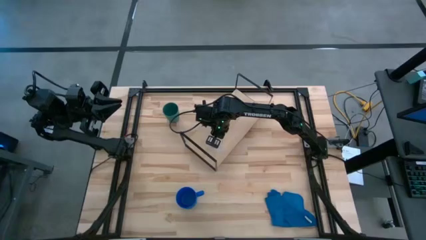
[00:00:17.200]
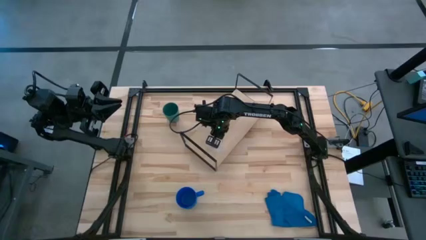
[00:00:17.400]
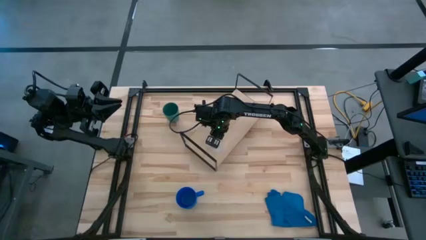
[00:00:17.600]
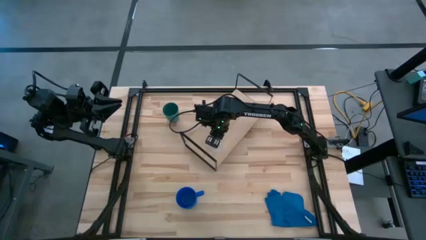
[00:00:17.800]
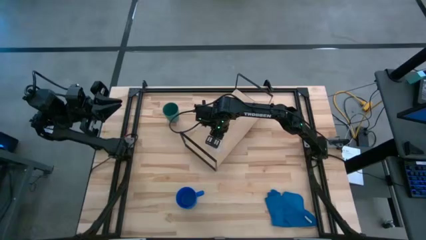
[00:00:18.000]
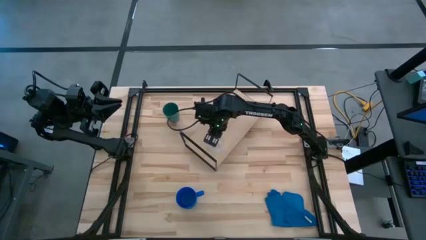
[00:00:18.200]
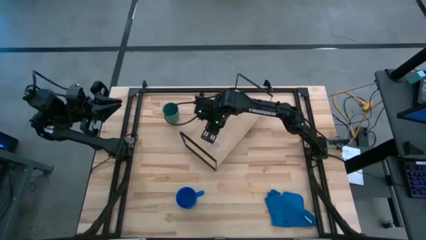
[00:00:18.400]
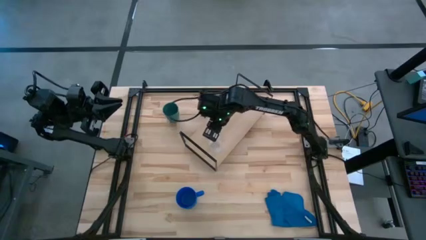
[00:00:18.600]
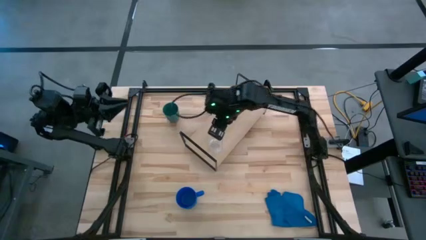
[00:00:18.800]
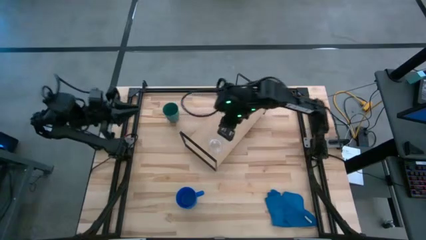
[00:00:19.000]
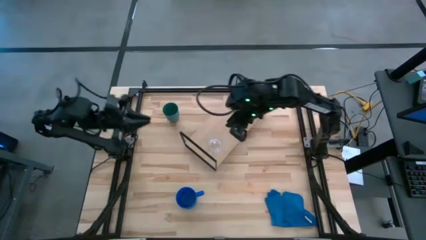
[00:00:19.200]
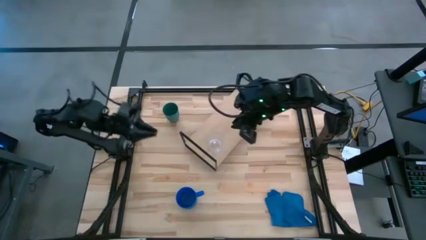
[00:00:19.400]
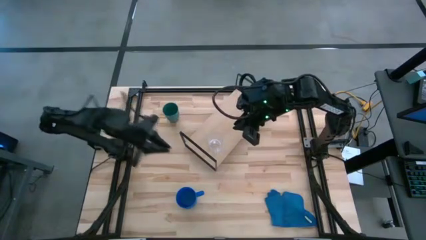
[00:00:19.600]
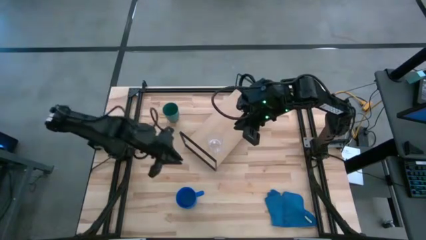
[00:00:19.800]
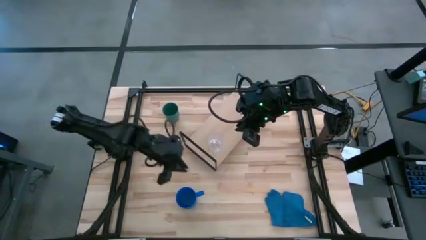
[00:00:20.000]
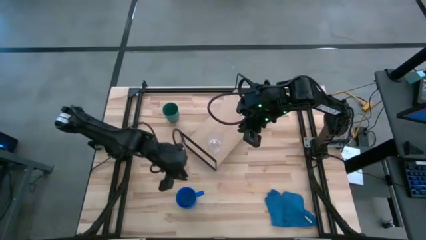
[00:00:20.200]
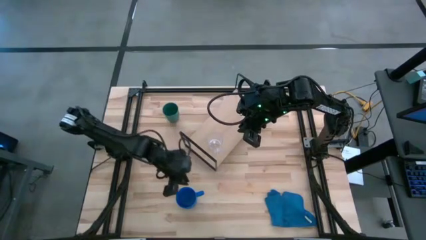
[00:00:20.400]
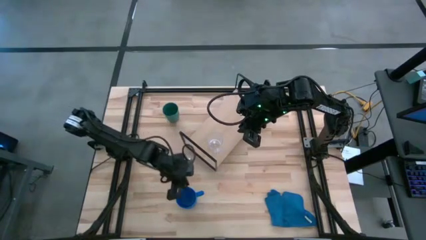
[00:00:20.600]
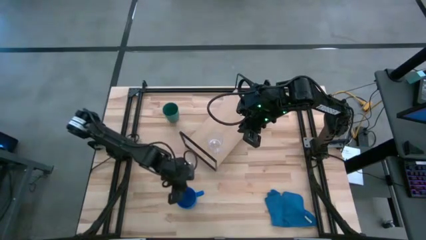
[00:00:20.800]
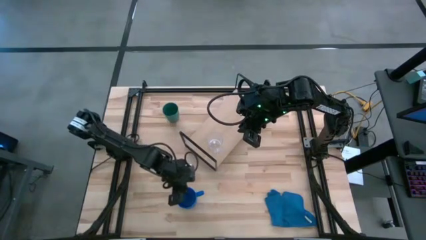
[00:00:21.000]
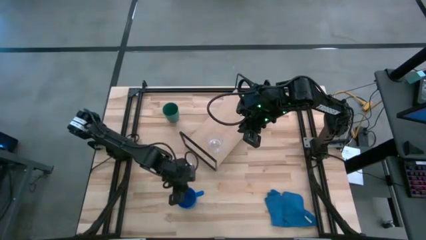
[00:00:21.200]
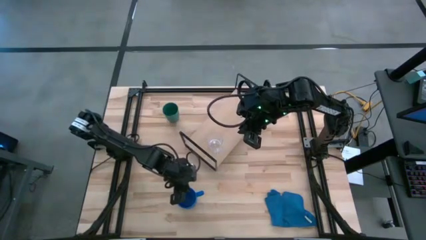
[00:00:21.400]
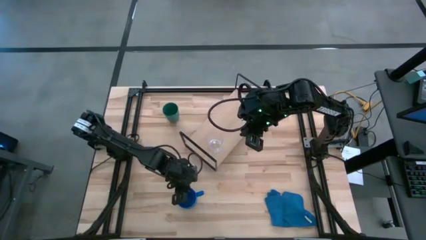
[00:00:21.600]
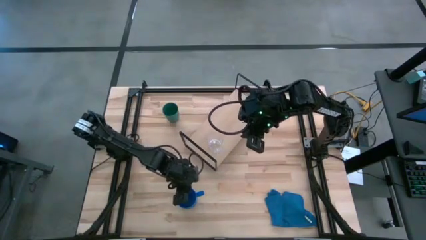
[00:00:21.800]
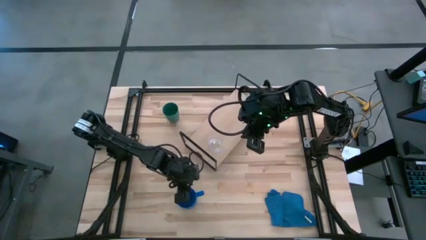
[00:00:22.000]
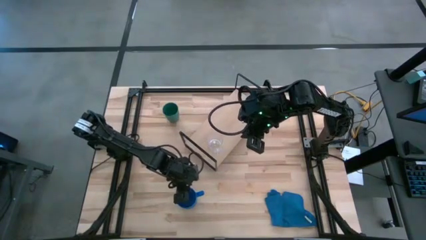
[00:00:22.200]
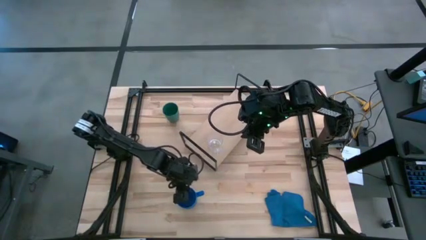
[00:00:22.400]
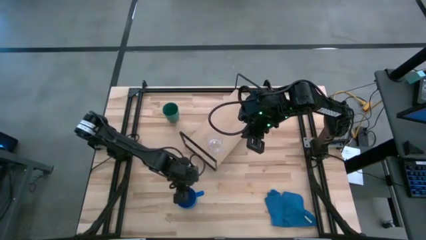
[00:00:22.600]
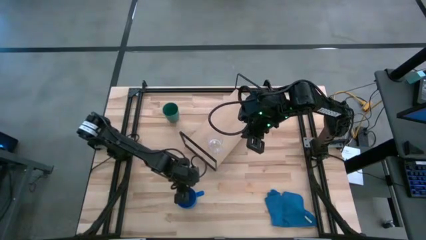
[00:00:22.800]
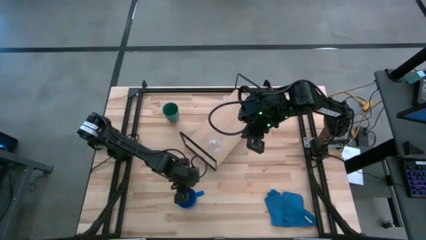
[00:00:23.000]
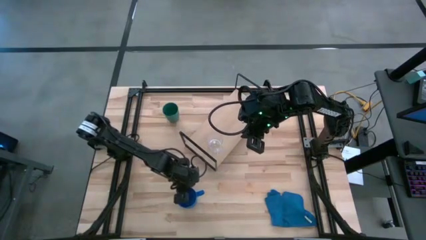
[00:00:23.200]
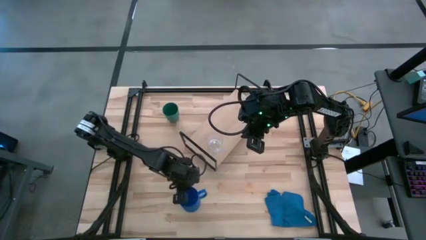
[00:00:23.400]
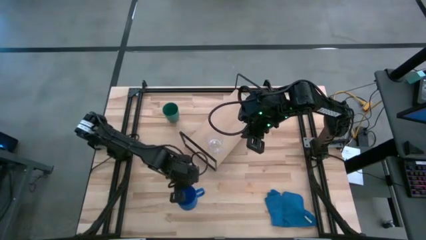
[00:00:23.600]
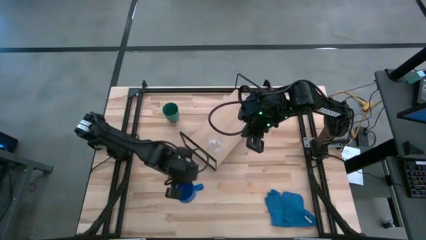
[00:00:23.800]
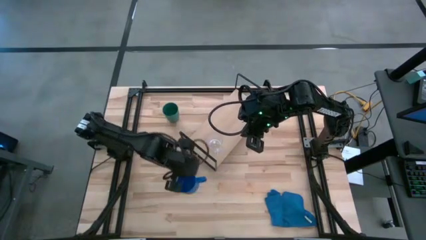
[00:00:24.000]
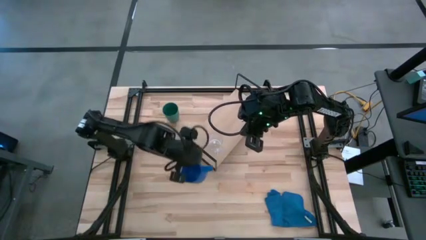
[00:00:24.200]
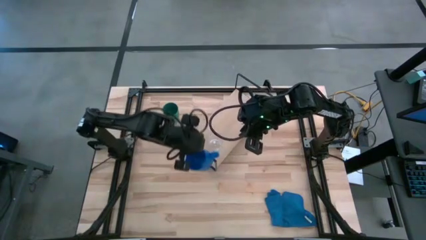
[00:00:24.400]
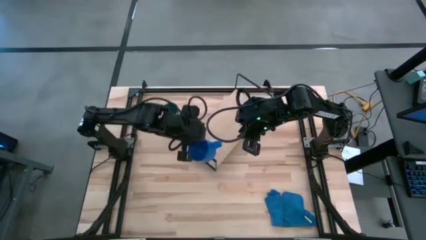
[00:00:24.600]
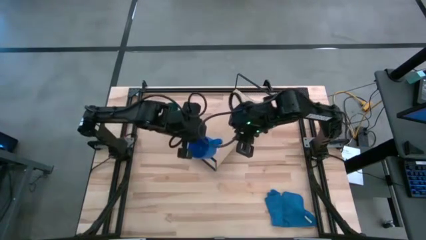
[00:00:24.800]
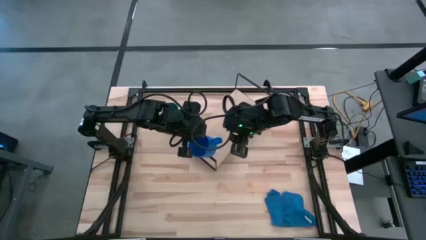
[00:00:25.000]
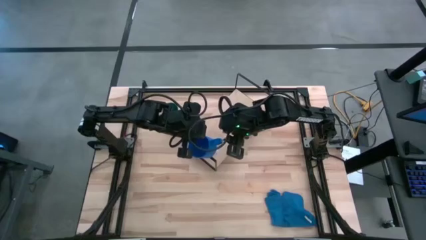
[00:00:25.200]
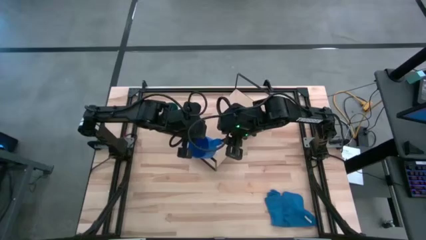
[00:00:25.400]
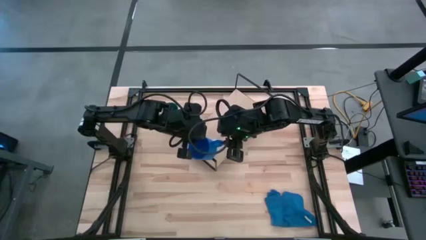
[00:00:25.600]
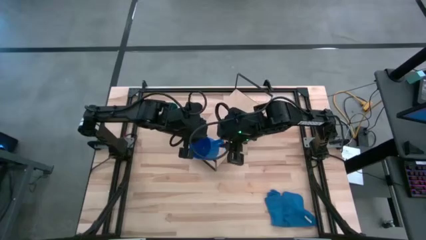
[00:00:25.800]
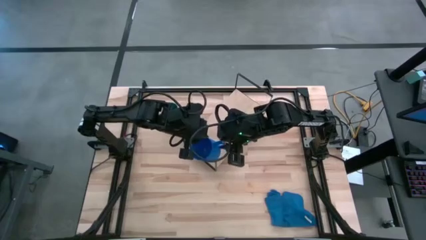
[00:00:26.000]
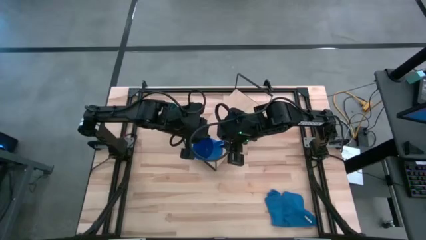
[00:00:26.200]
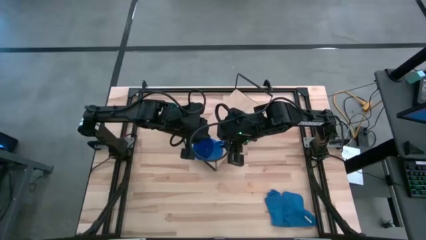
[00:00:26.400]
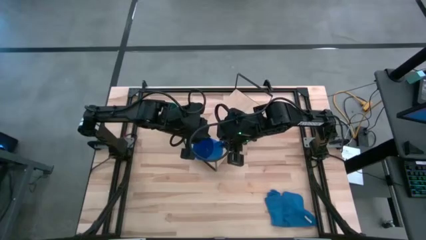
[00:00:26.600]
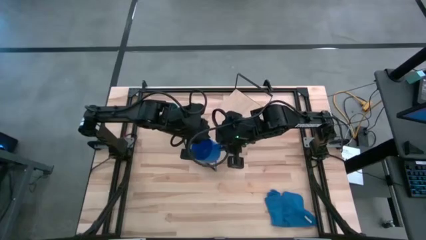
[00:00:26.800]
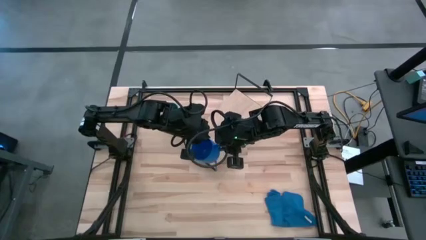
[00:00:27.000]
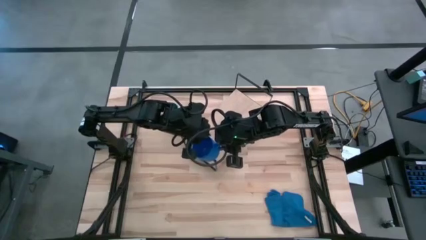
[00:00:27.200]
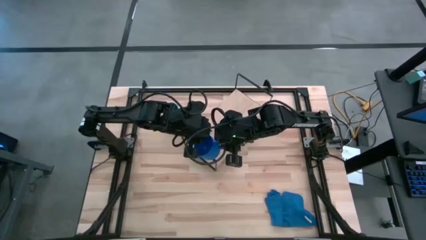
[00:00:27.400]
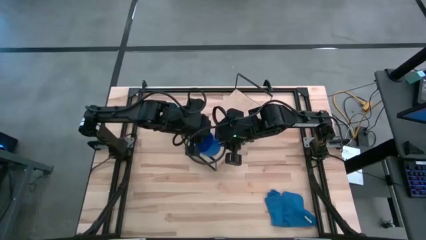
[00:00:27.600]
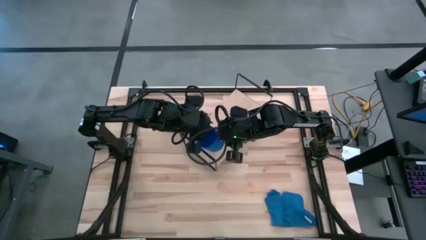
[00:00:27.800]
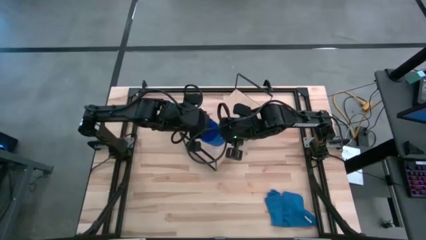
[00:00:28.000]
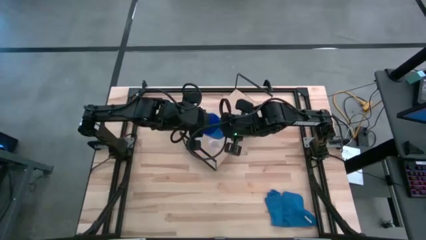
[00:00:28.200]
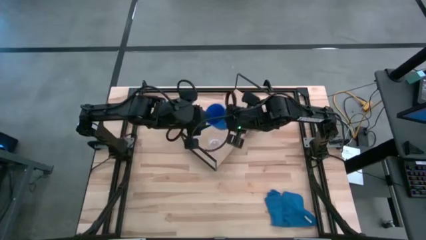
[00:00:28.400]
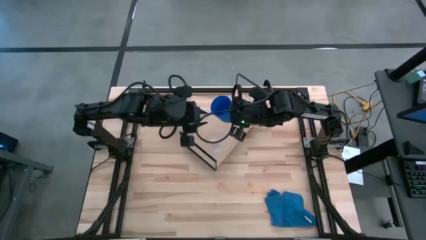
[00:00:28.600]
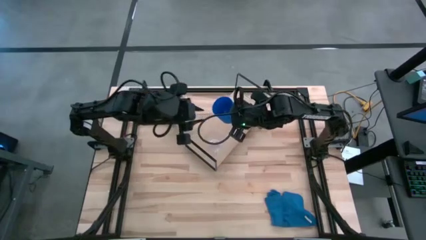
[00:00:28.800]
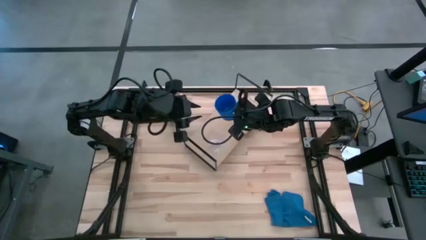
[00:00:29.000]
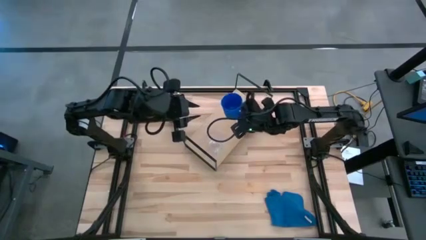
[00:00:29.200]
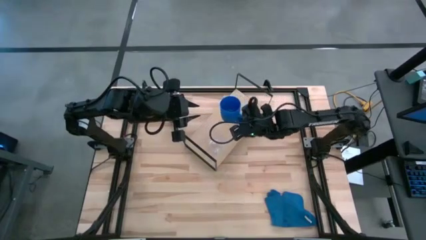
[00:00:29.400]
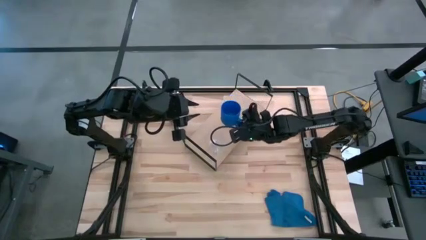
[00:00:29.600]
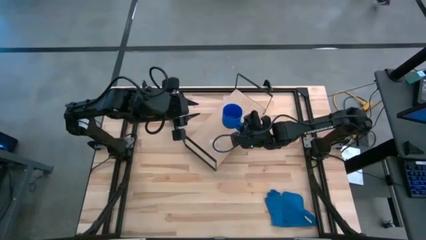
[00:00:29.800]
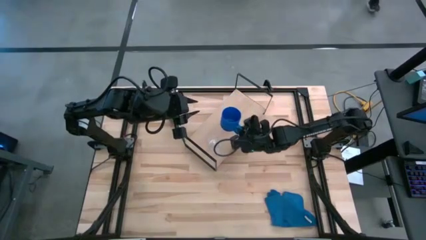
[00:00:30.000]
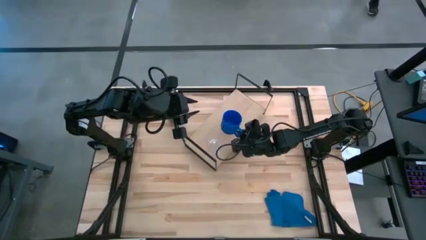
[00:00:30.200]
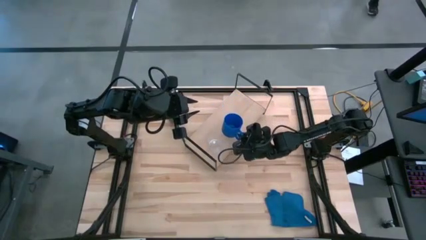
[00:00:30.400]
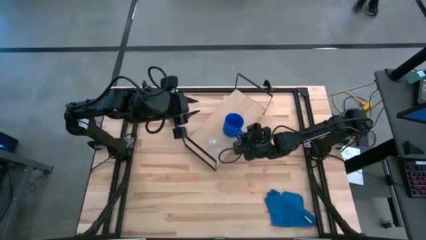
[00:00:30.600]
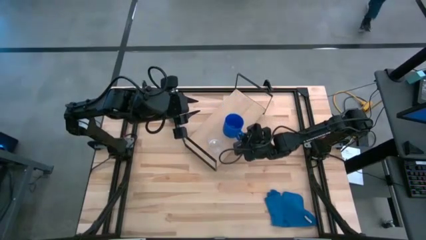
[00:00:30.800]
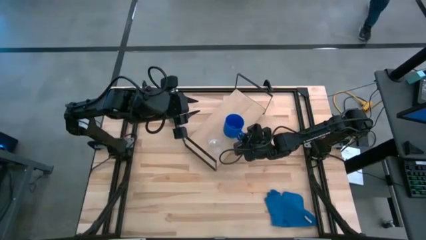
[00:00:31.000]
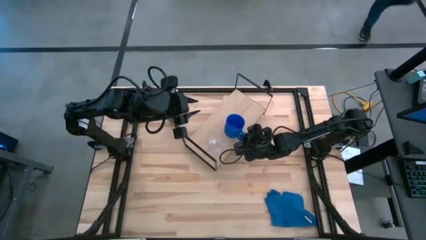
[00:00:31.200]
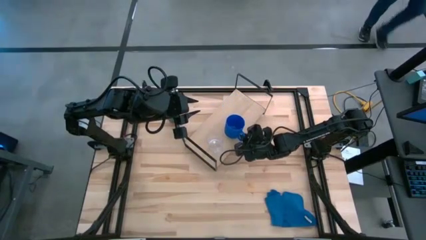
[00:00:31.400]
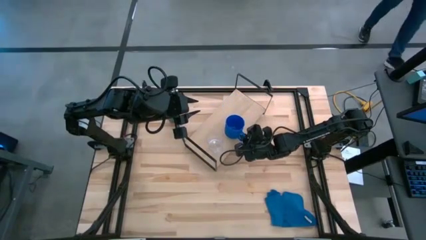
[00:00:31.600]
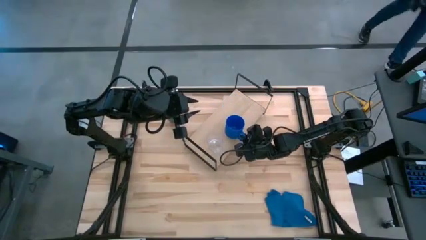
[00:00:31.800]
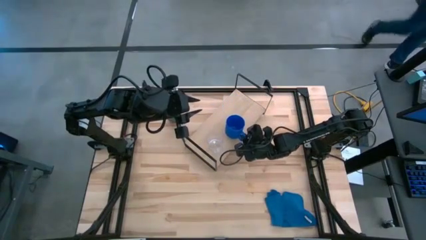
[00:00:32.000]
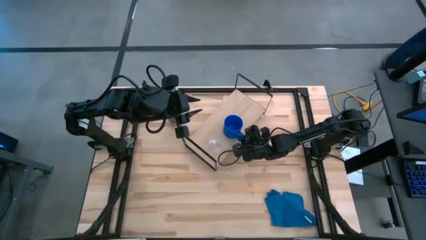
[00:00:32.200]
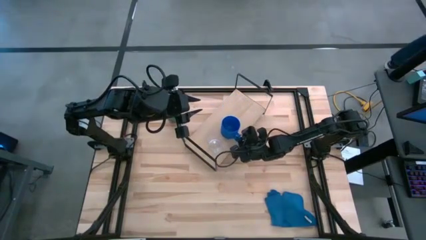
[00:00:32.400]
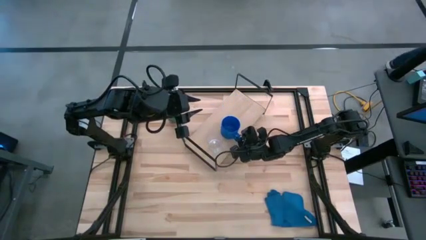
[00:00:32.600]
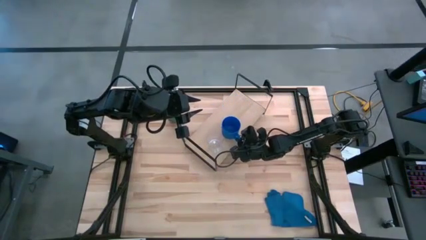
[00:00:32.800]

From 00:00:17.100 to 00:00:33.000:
Task: Stack small to large cups/mugs on shelf
Put the blue mug on the shelf
